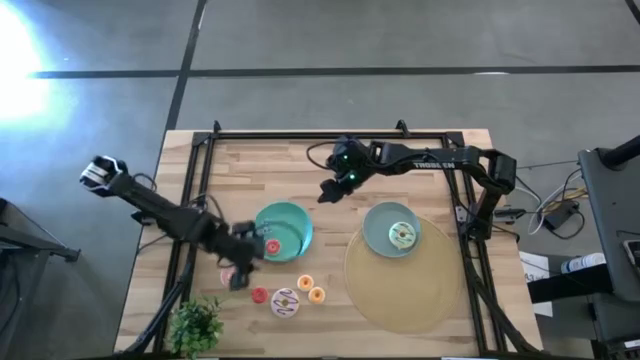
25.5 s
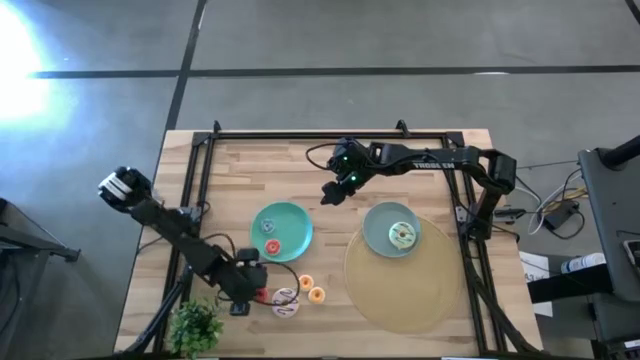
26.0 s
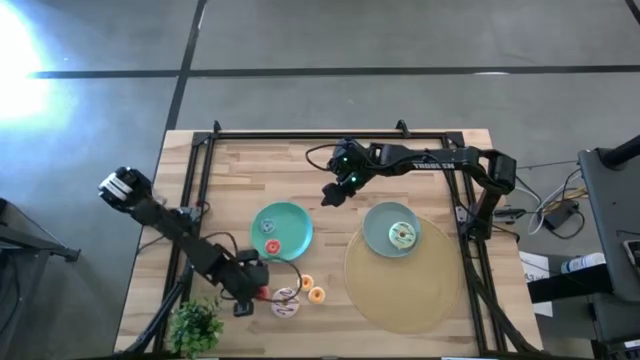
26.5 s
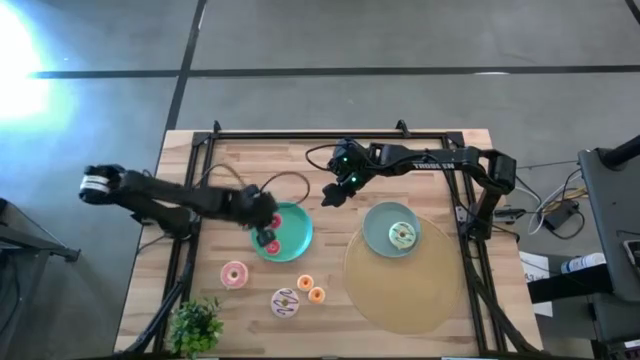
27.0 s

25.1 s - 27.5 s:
Task: Pick & Place donuts
Put the small red donut on the blue plate

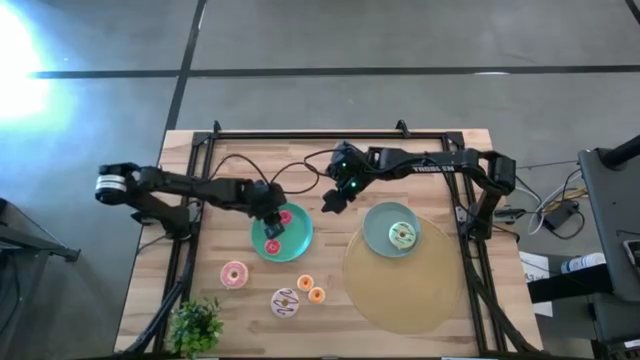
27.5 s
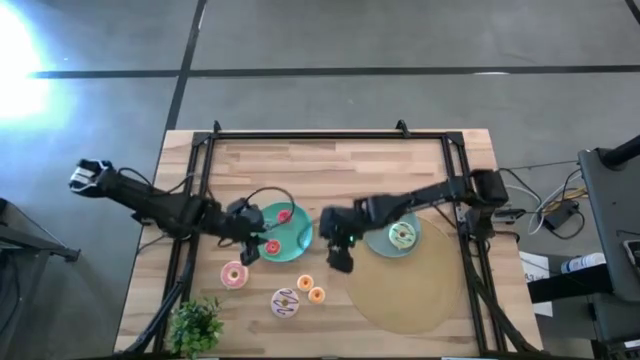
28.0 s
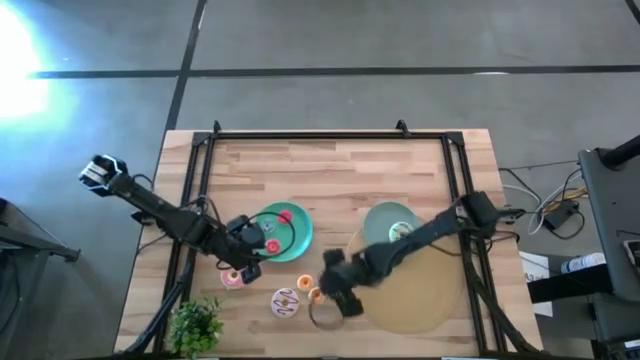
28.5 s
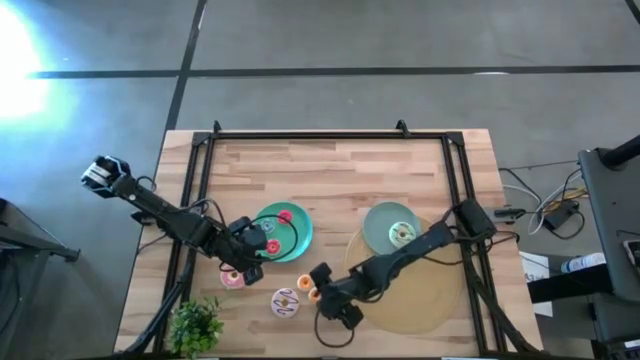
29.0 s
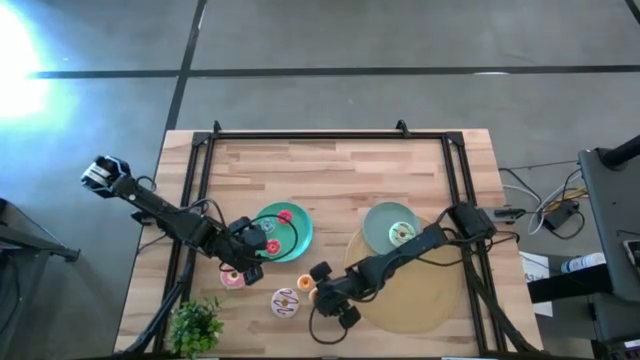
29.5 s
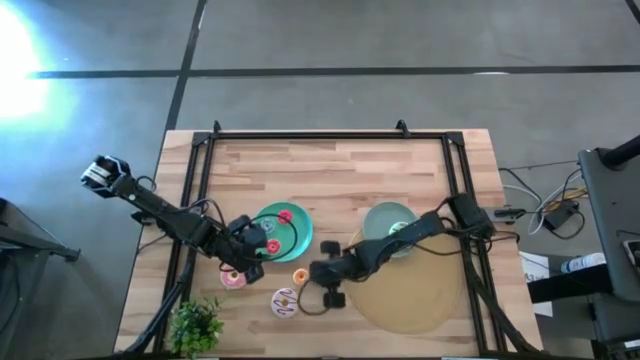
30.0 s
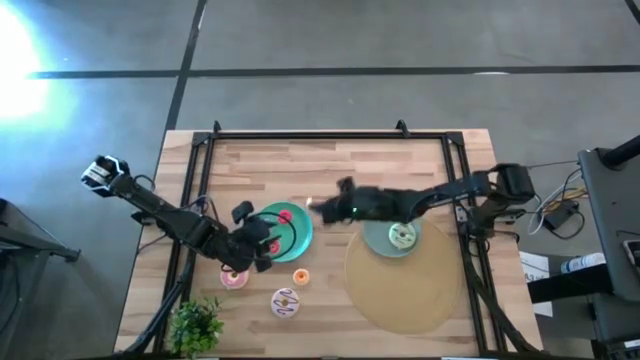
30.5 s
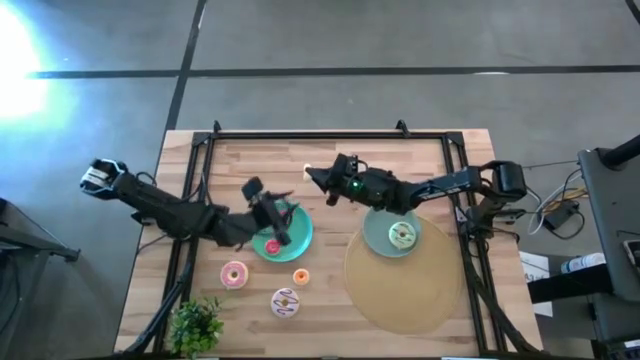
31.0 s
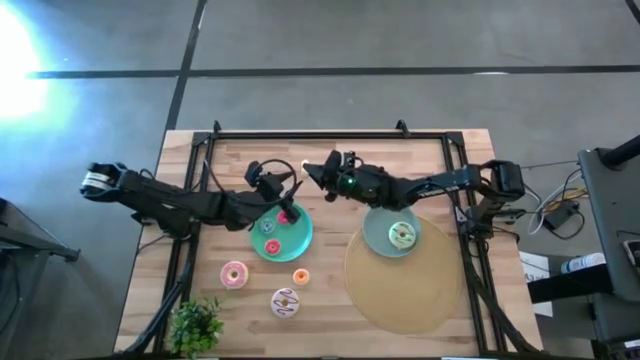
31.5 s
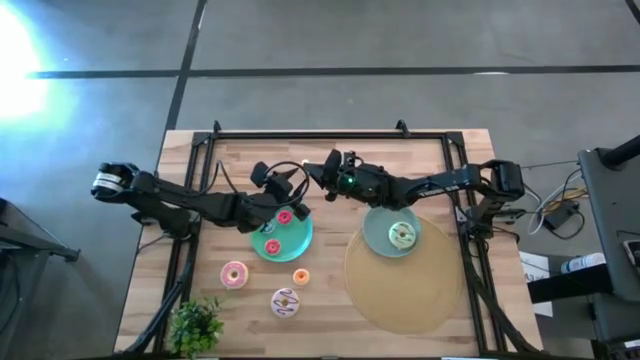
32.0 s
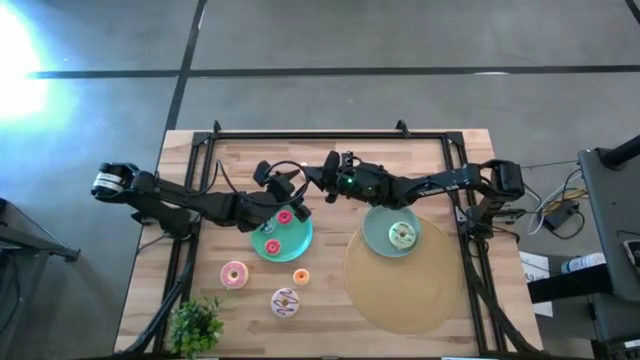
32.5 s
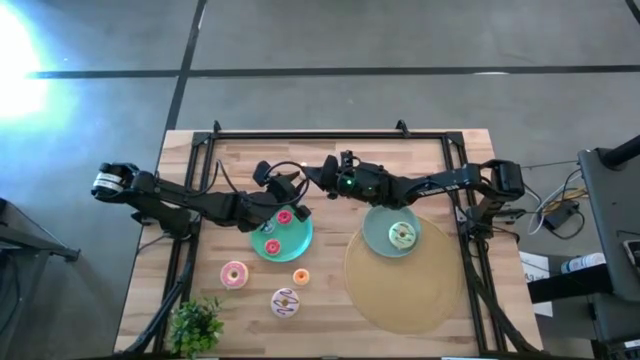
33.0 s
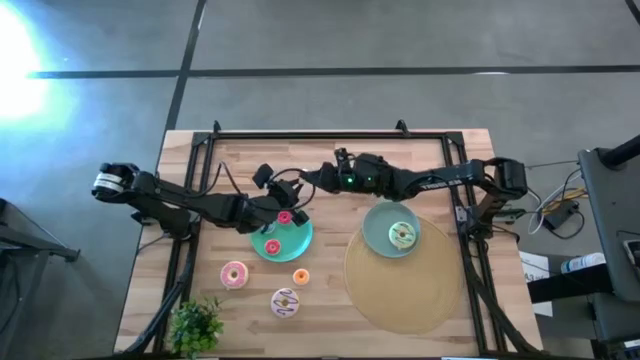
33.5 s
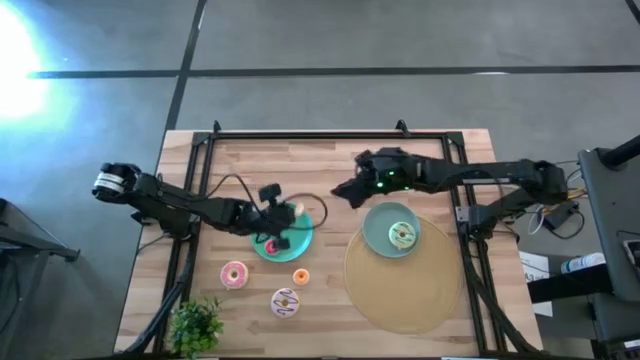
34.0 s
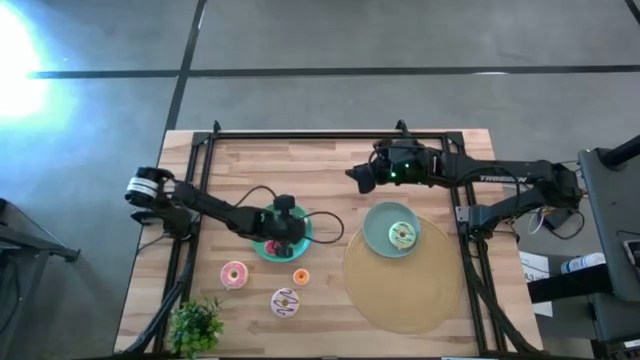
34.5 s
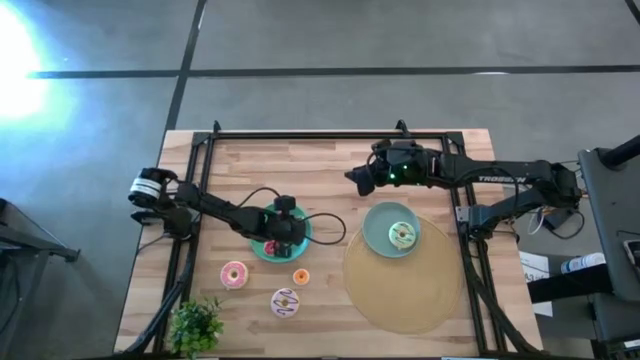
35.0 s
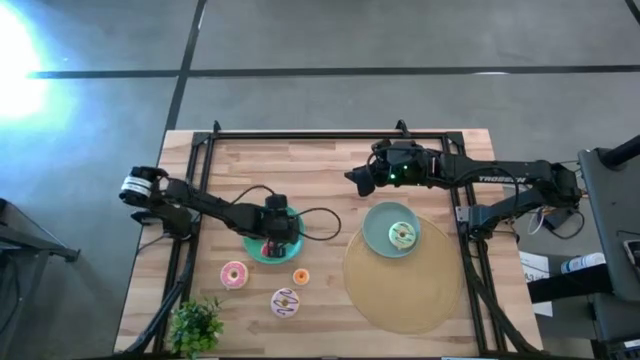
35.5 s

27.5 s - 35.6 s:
Put the small yellow donut on the blue plate

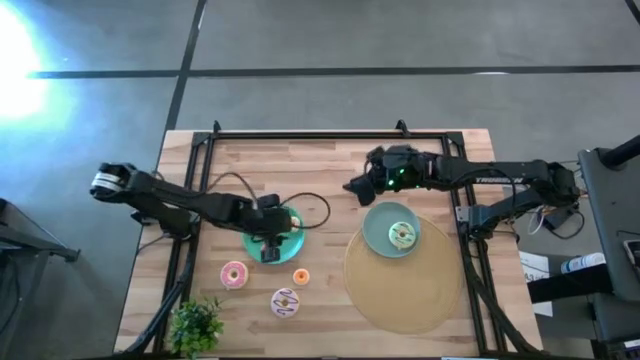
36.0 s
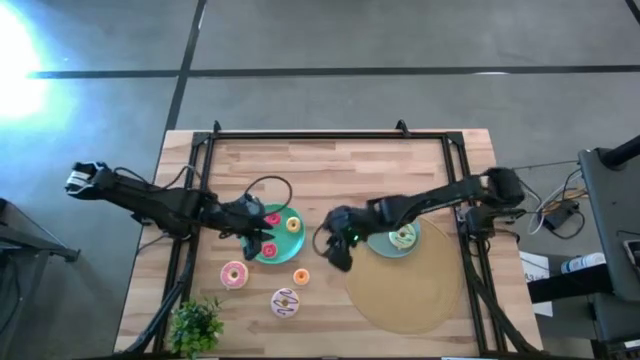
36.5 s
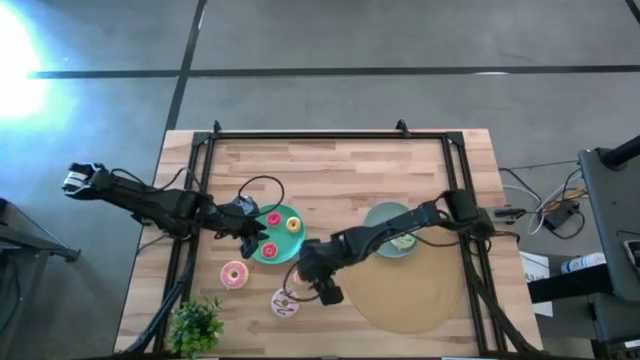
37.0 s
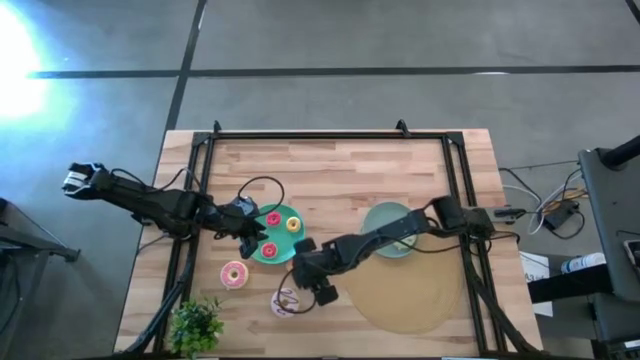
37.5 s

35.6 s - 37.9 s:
Put the small white donut on the blue plate

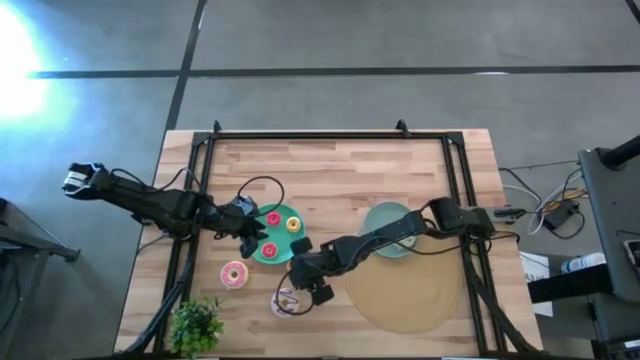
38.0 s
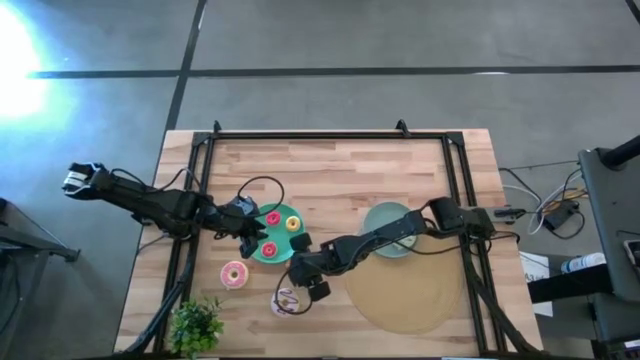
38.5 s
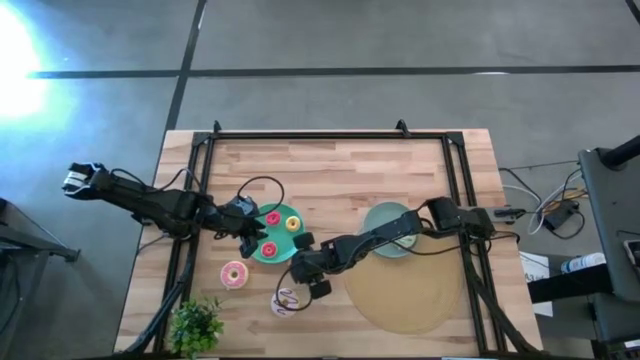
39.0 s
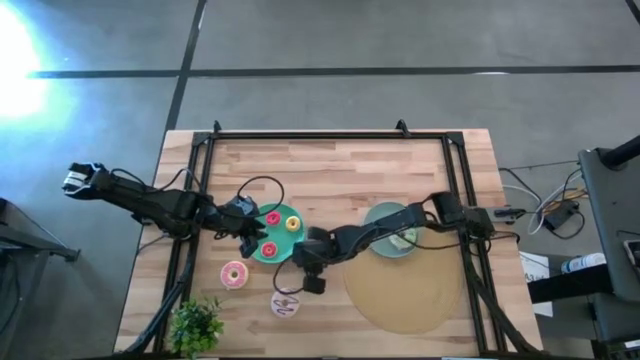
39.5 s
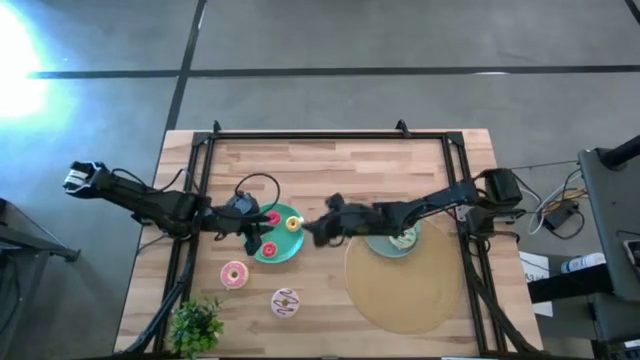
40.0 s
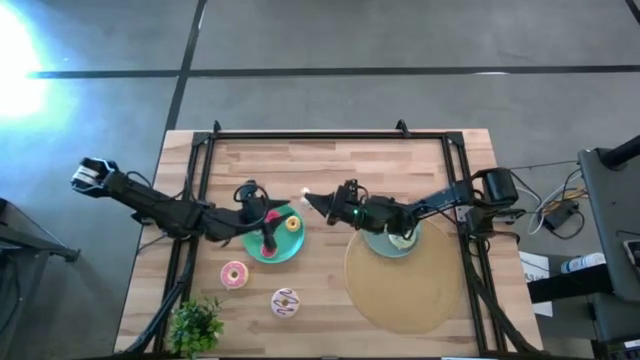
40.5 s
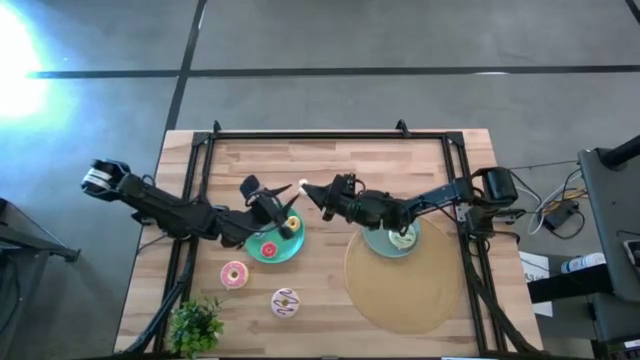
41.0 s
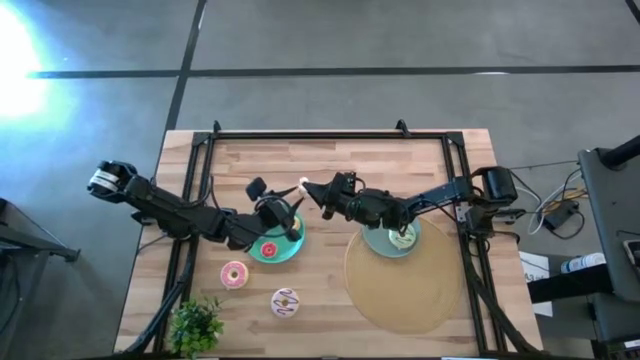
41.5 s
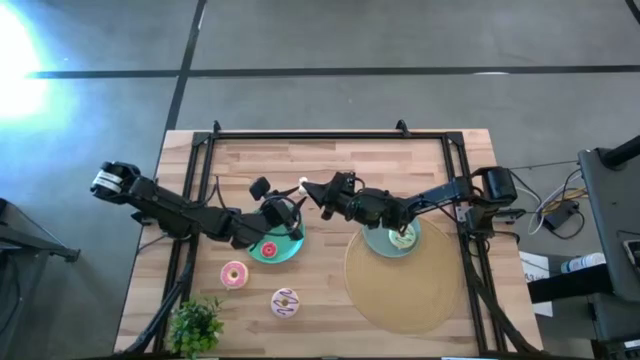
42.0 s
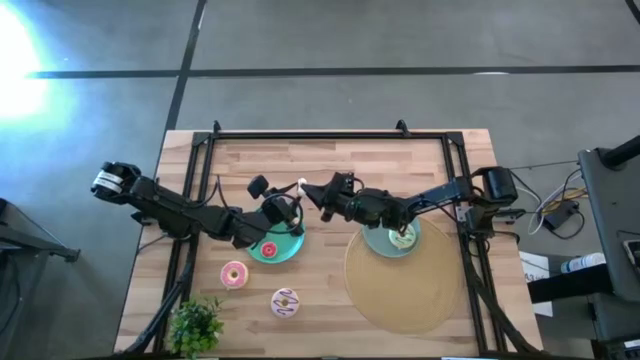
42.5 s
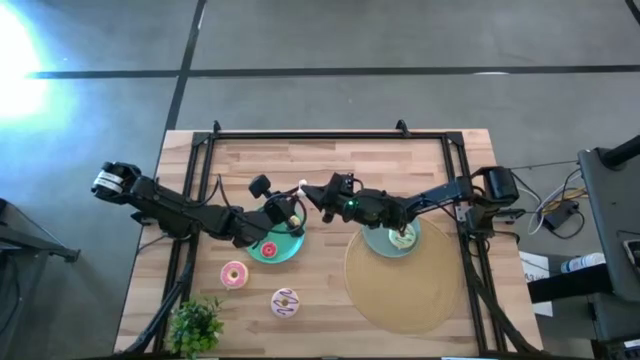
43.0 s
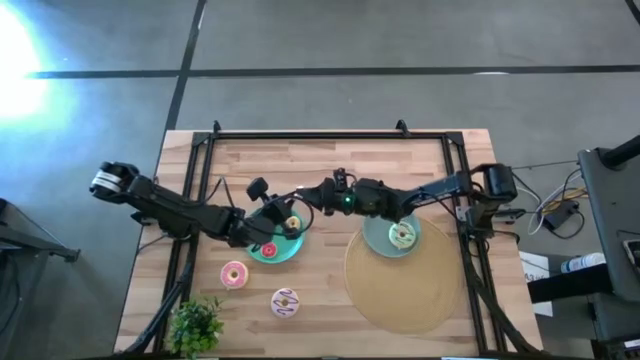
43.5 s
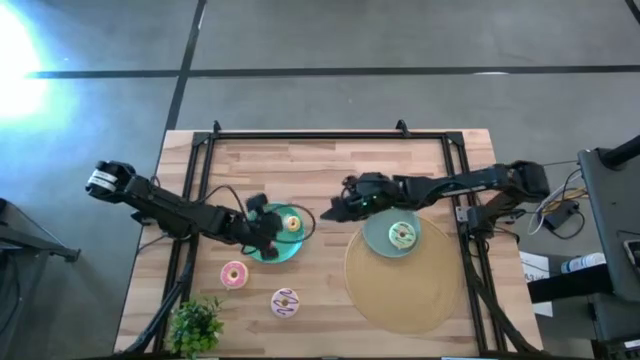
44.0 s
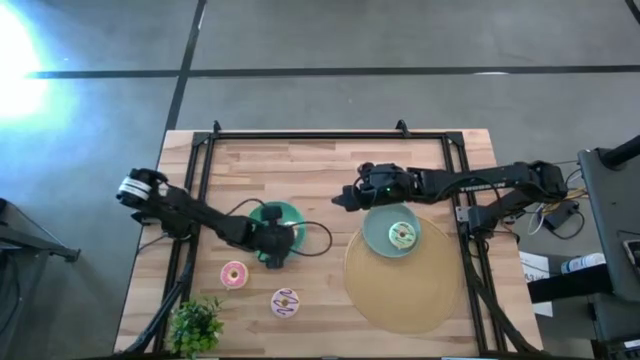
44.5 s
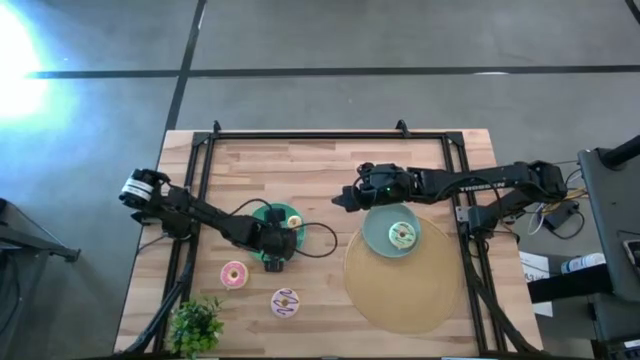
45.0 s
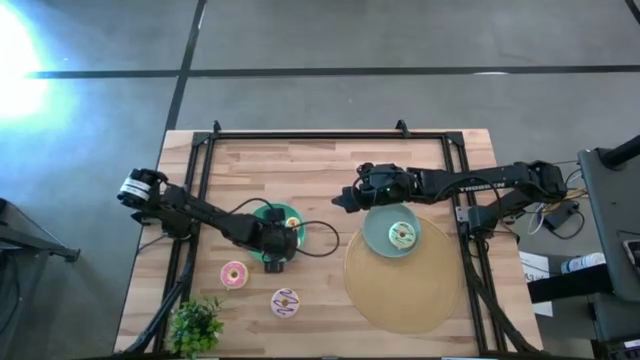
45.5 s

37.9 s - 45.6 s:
Put the small white donut on the blue plate
